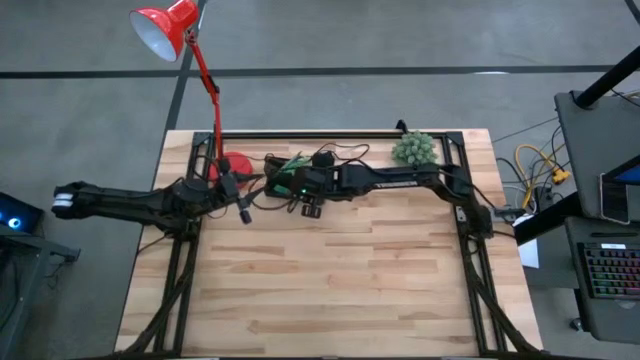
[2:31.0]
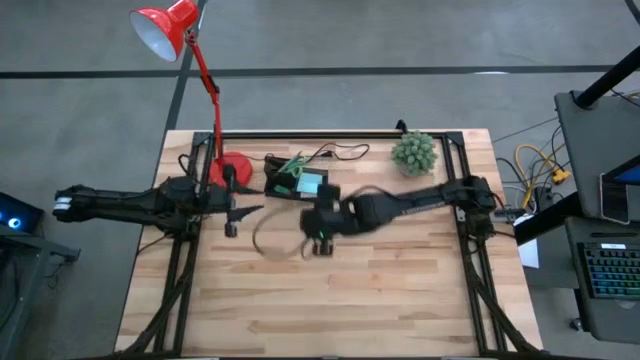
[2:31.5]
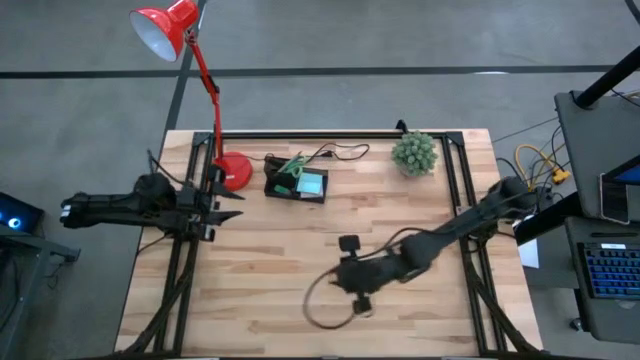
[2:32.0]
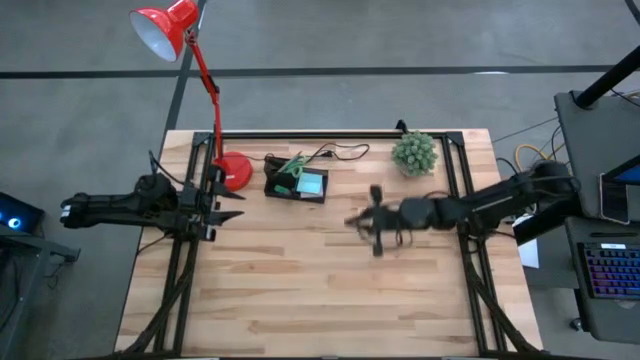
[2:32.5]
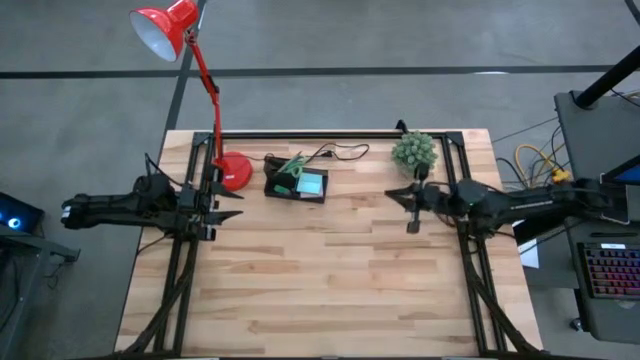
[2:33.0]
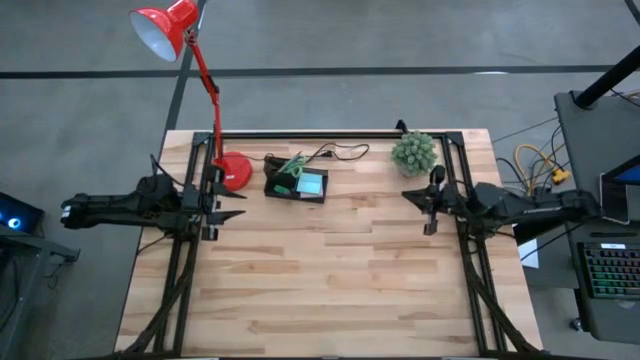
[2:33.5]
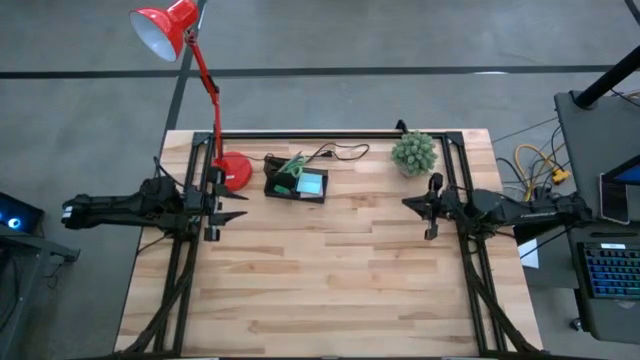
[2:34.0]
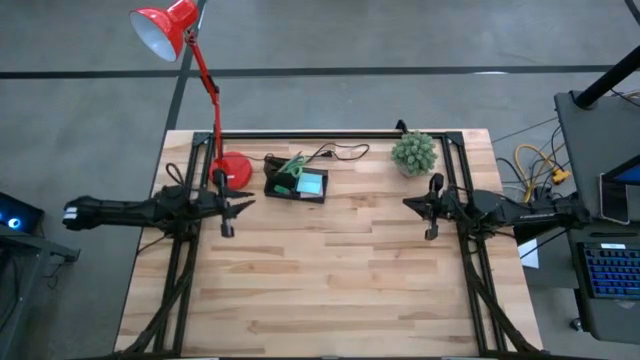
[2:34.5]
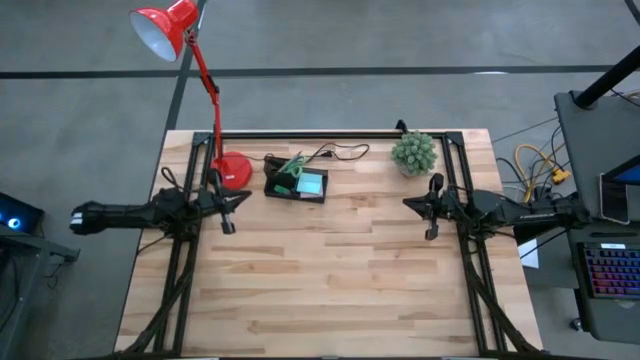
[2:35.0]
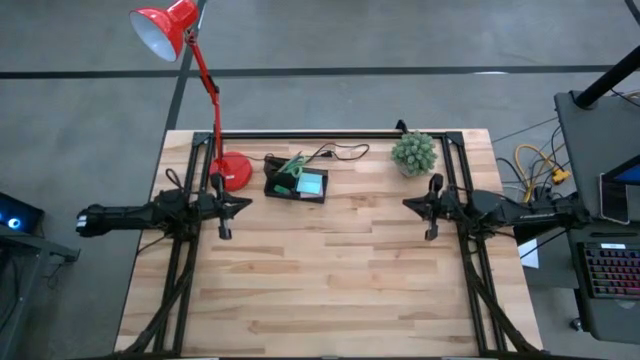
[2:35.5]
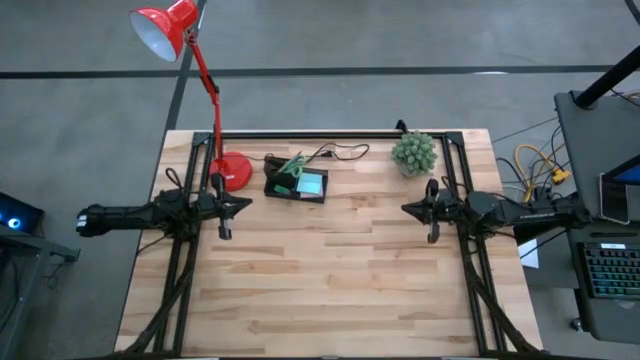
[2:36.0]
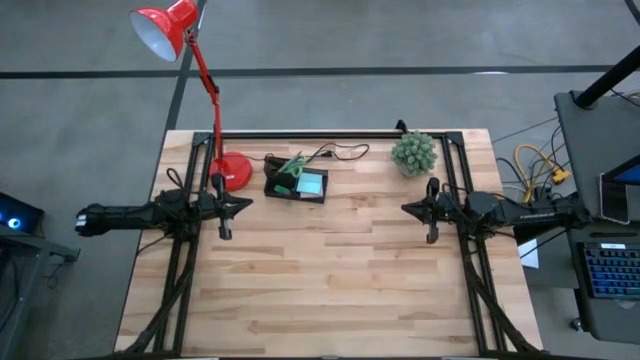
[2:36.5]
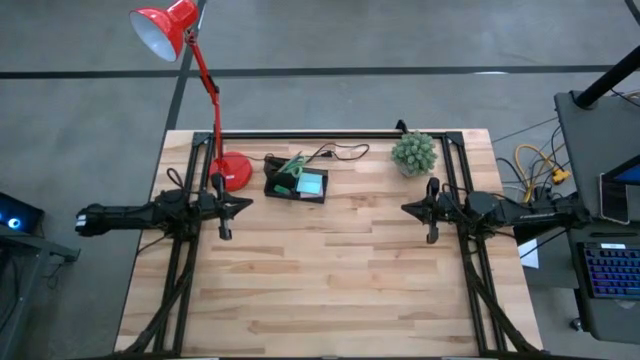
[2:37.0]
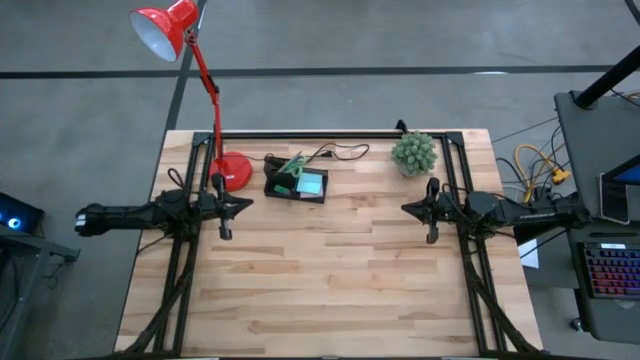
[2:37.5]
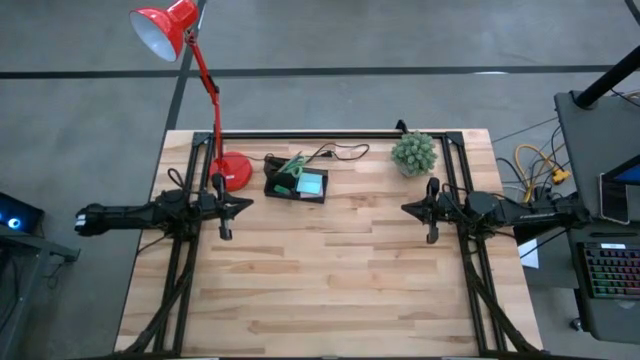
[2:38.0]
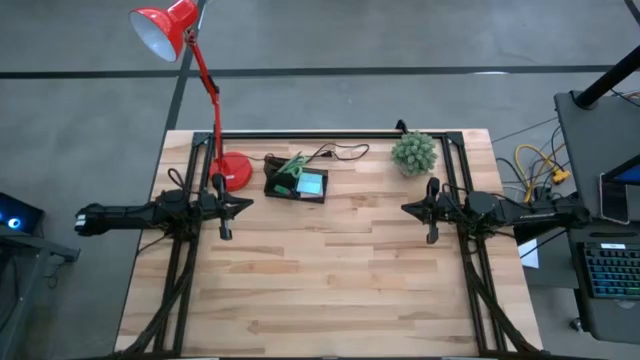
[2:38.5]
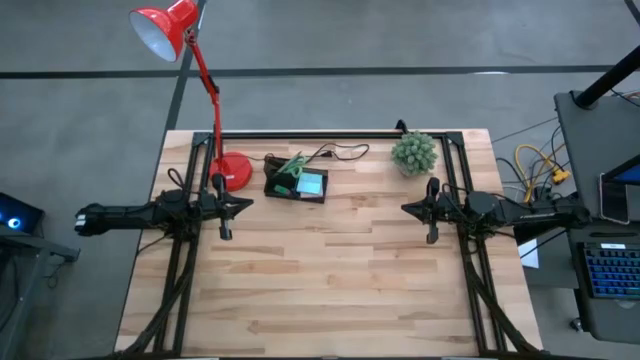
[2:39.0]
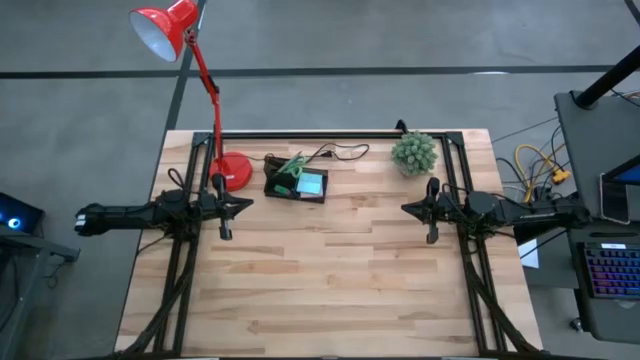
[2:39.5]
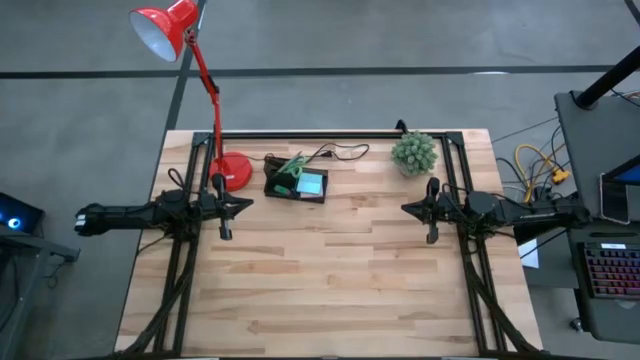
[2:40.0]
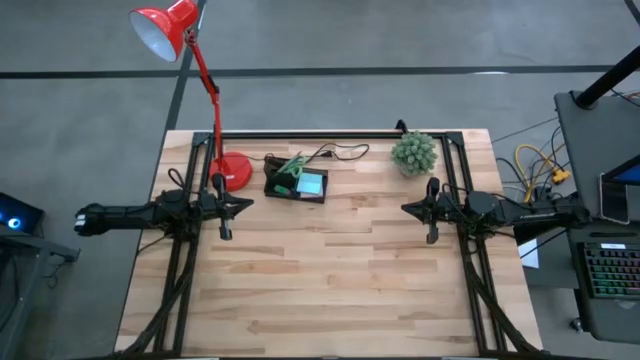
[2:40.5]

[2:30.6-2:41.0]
Task: Pick and place office supplies into organizer
Return to Home Position

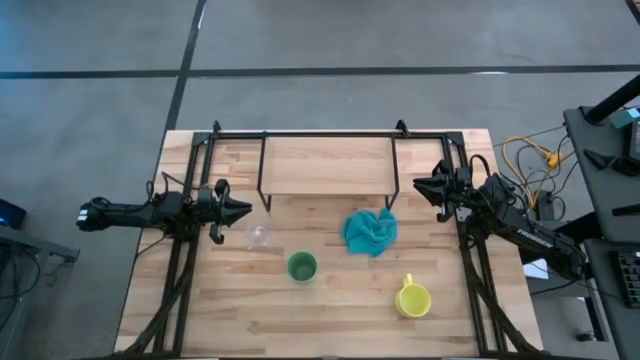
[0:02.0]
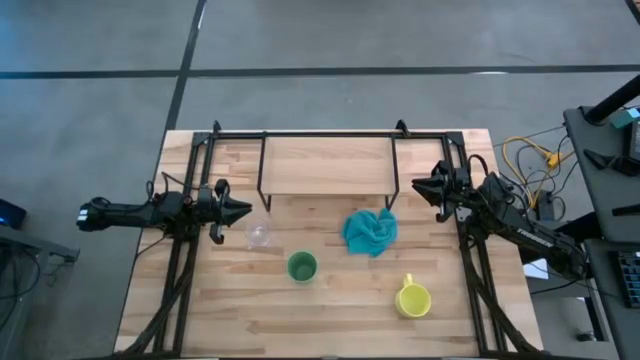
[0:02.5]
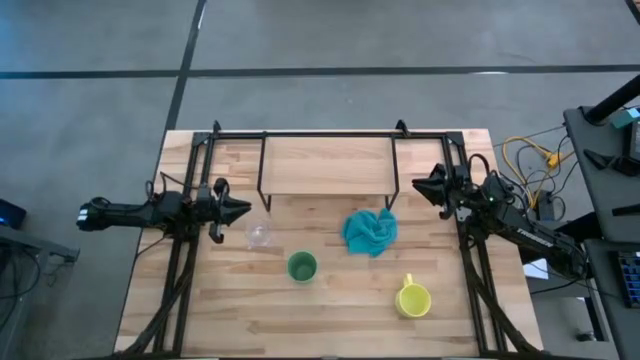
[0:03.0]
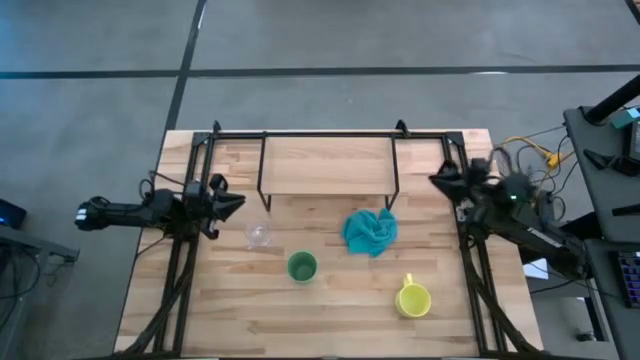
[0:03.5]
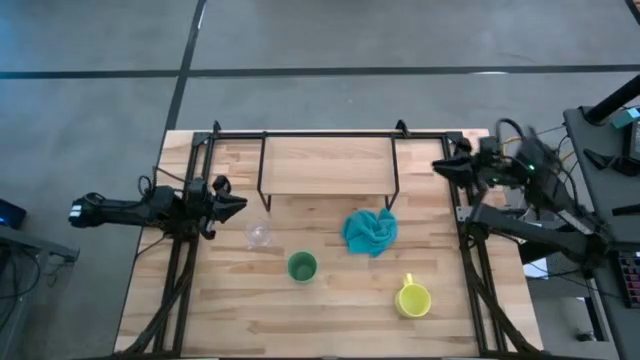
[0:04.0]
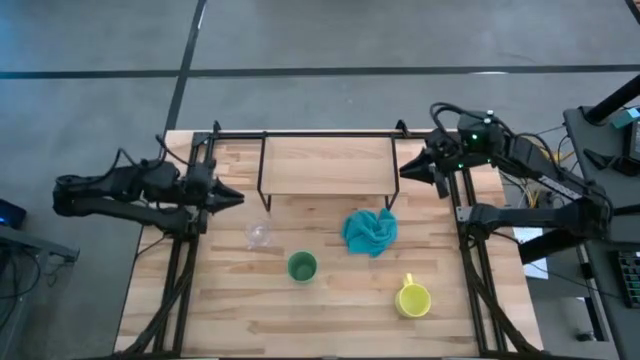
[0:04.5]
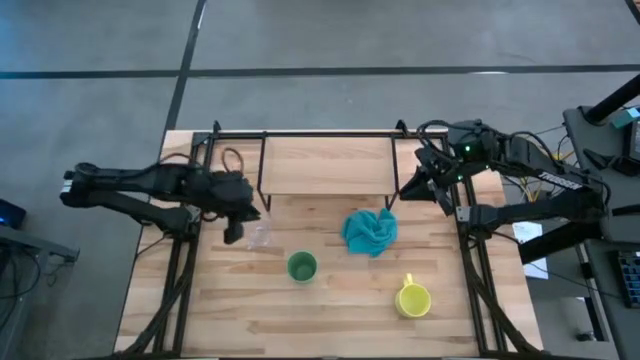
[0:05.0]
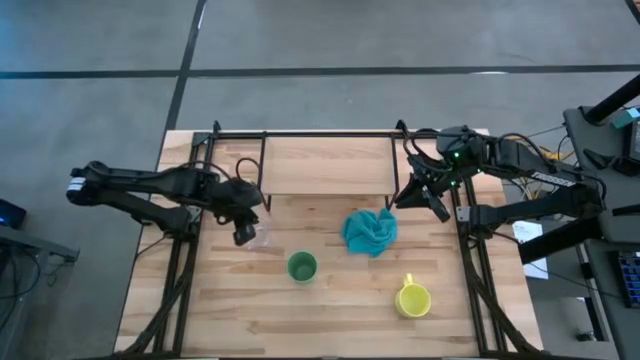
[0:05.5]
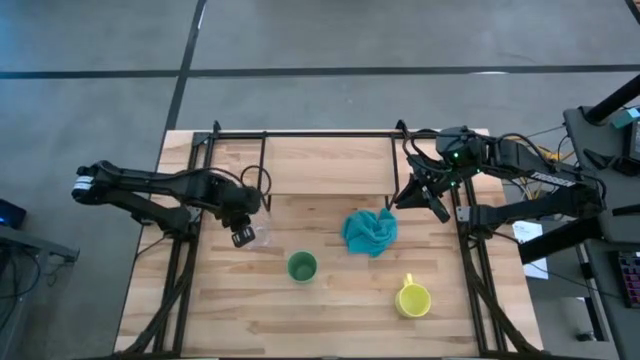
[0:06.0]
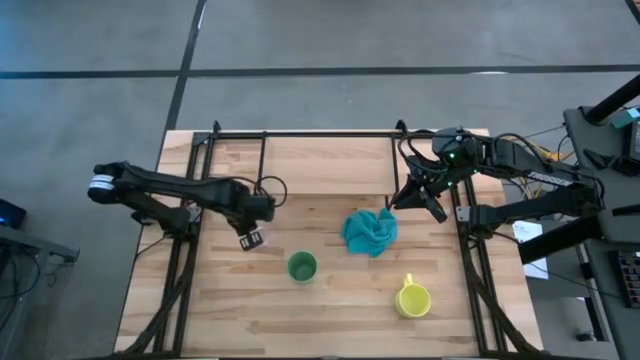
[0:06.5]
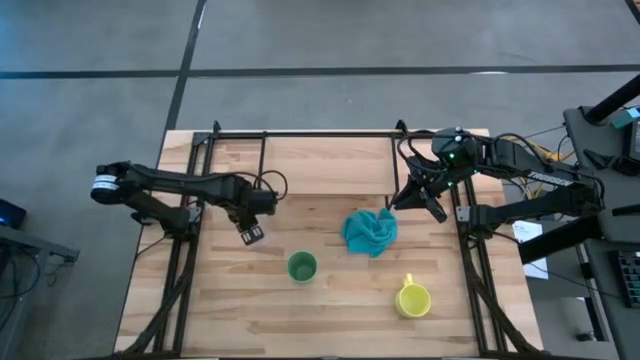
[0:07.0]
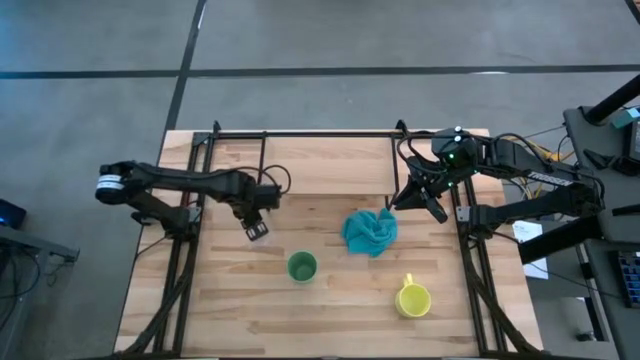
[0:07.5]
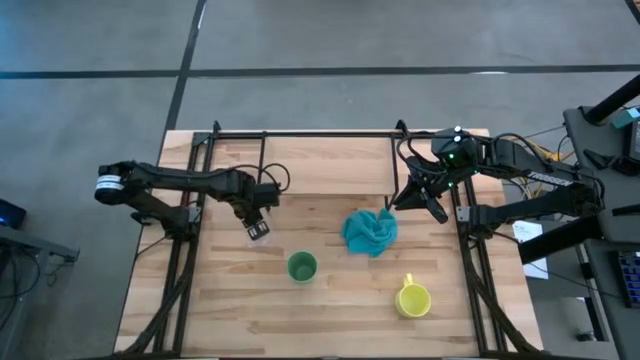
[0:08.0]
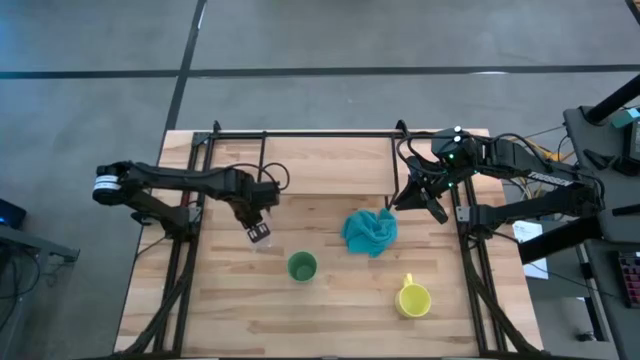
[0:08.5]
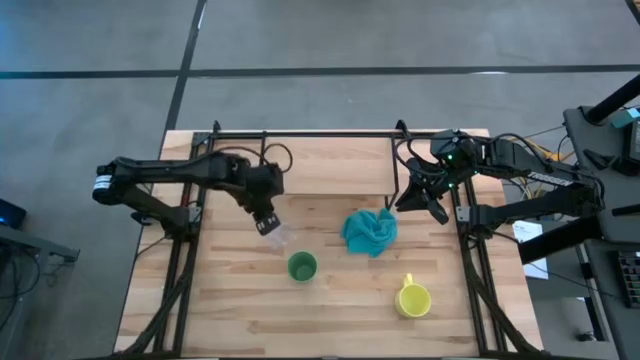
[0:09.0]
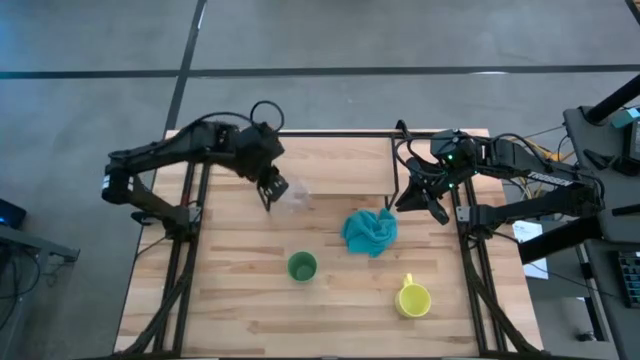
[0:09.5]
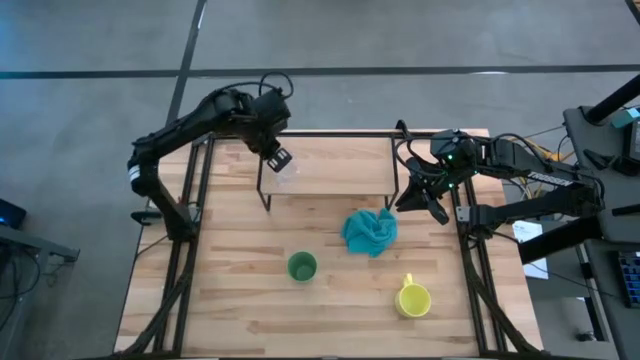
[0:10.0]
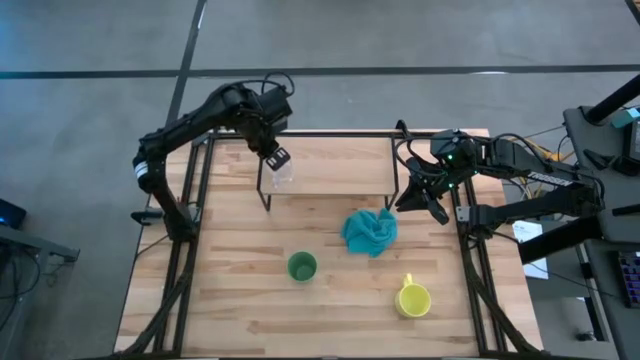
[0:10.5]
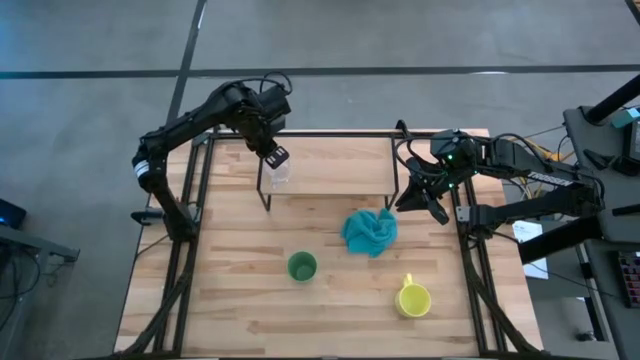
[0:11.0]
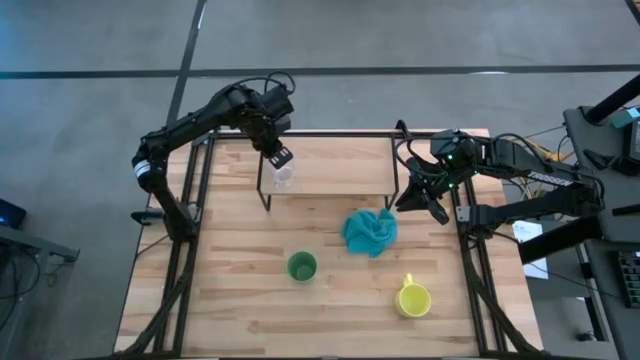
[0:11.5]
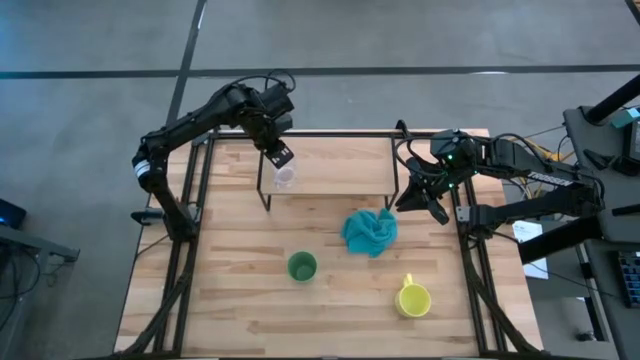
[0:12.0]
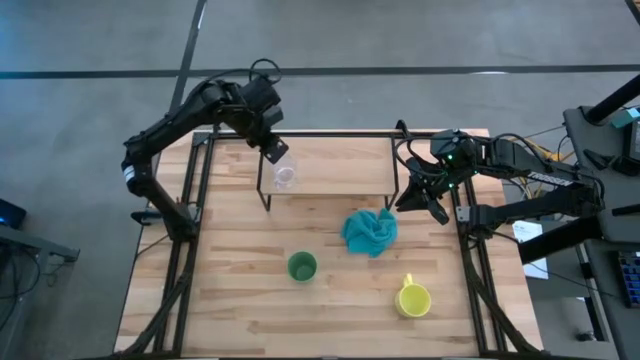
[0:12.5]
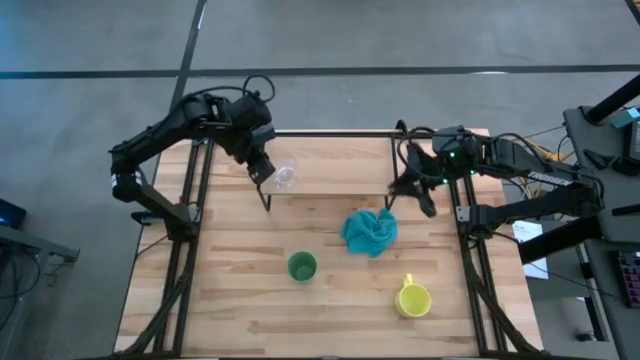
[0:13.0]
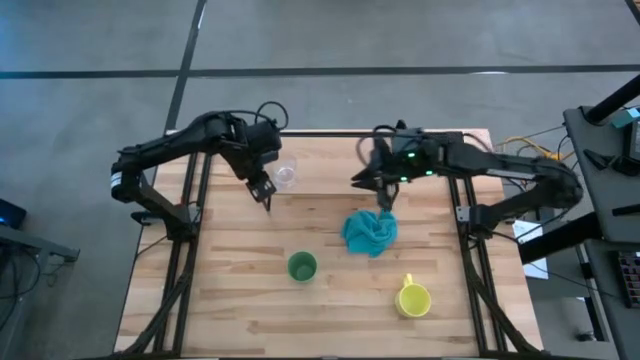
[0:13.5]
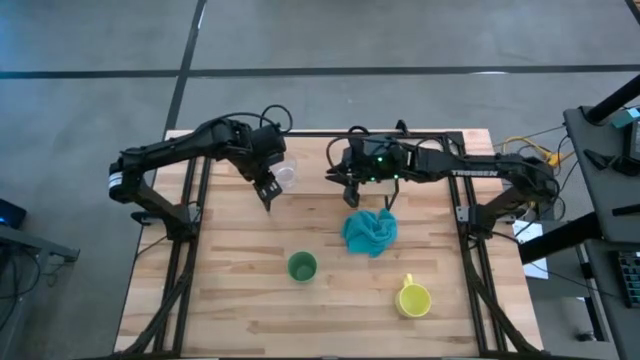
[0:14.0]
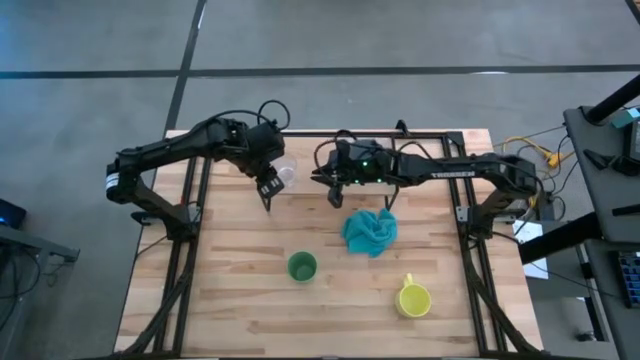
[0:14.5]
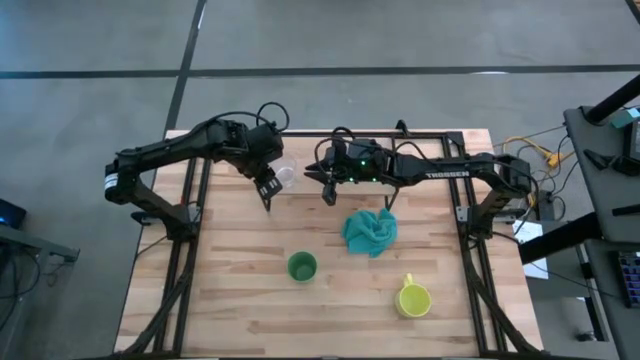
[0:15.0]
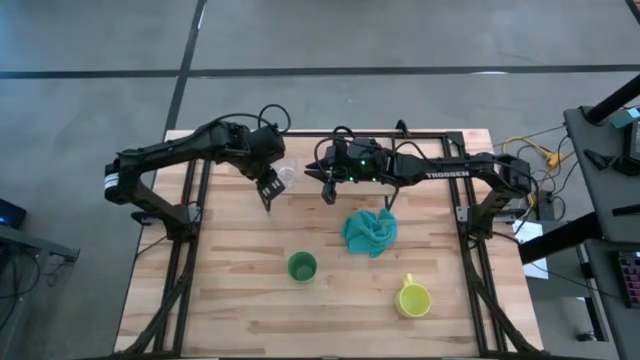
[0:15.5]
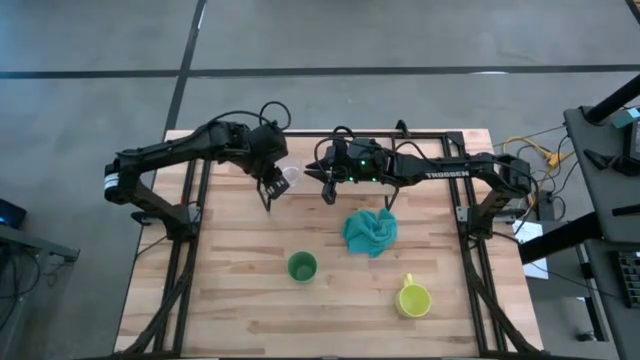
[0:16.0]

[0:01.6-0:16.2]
Task: Stack small to large cups/mugs on shelf
Put the transparent cup on the shelf
